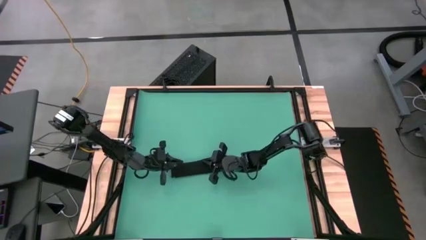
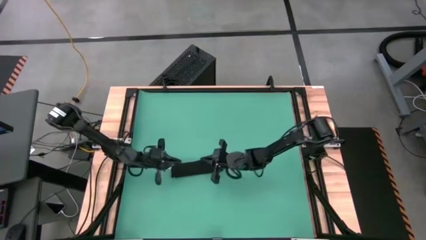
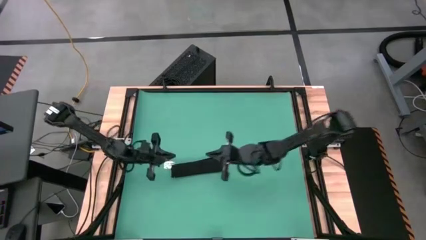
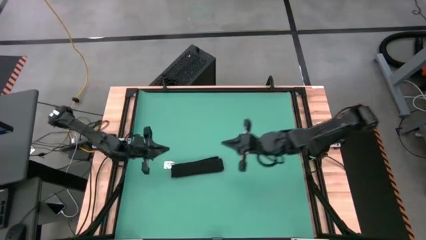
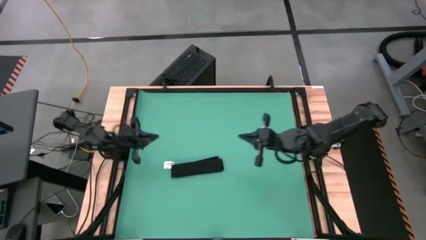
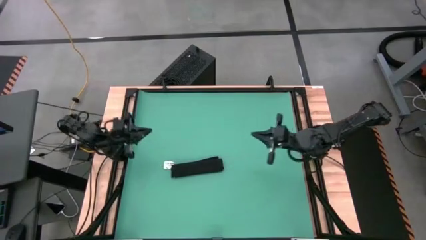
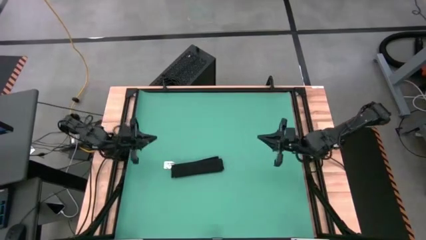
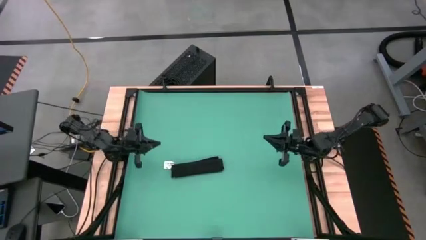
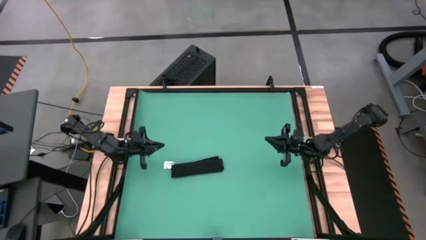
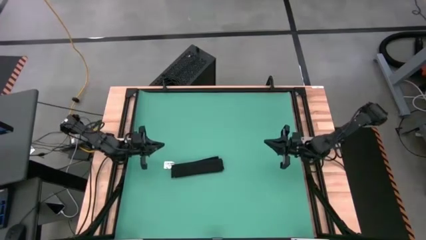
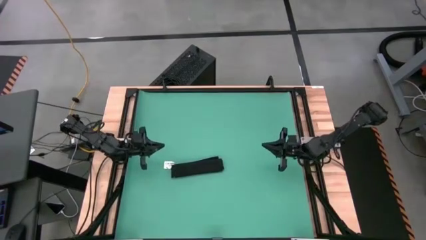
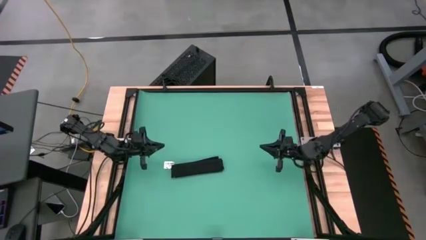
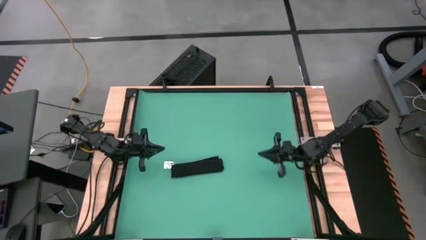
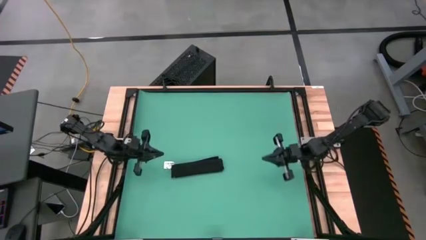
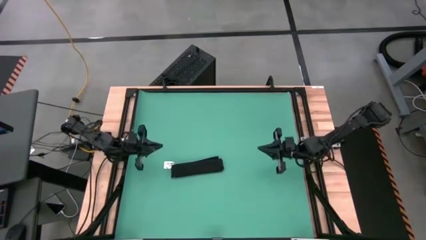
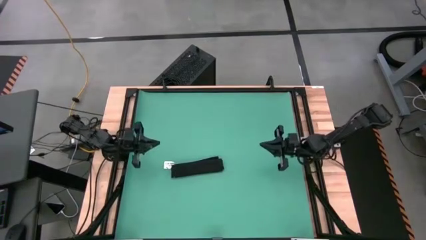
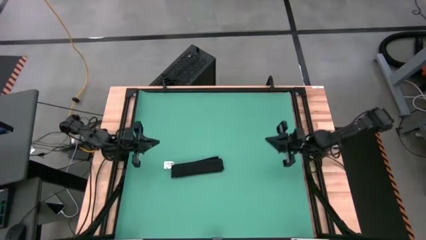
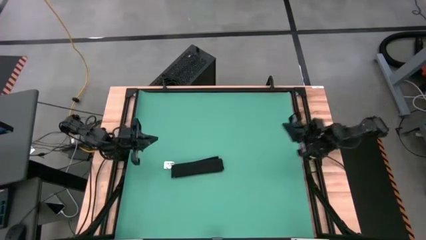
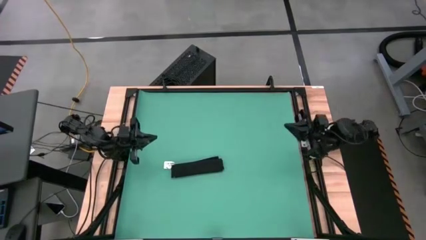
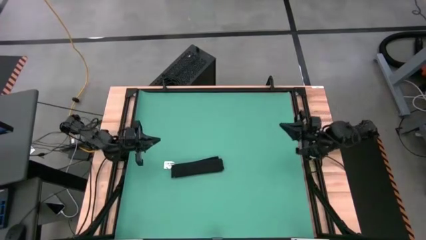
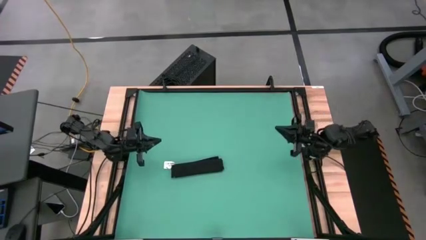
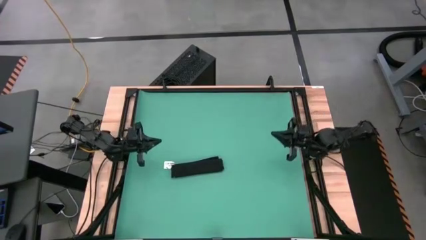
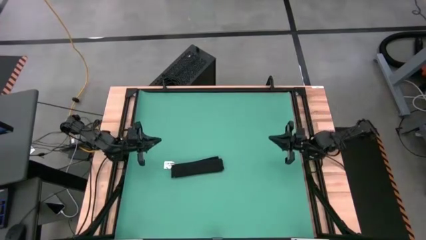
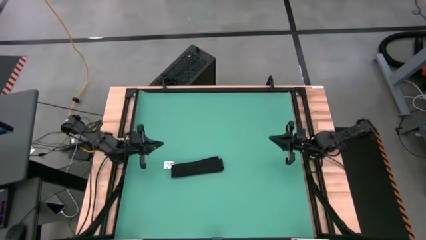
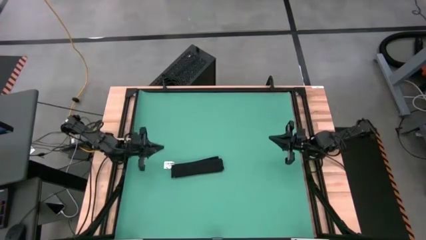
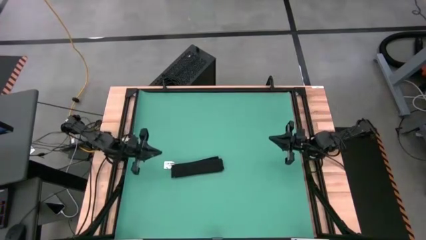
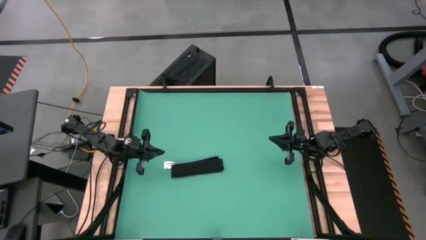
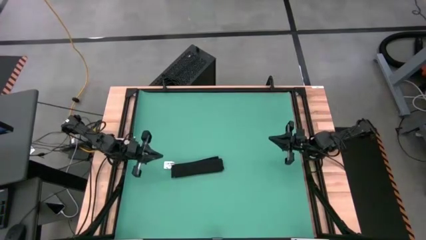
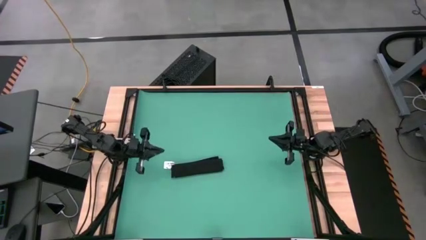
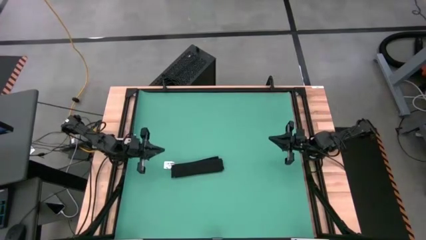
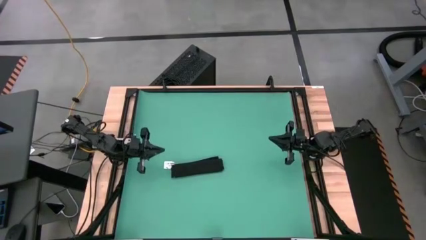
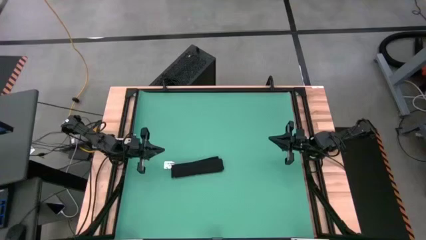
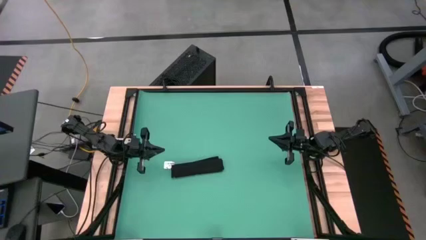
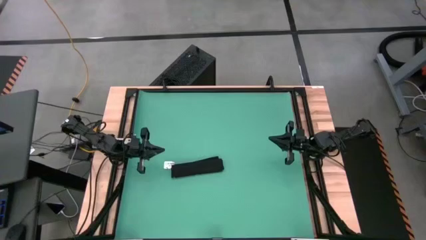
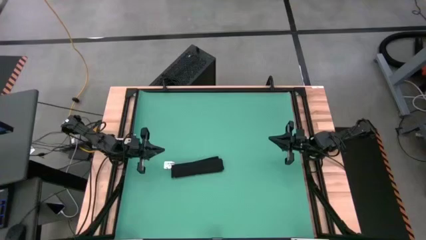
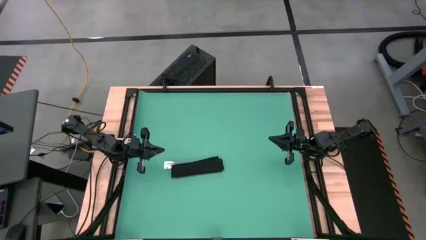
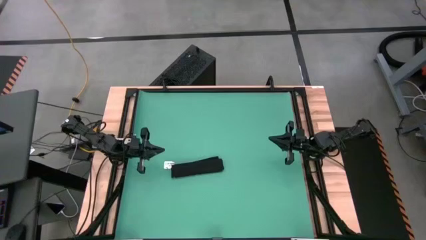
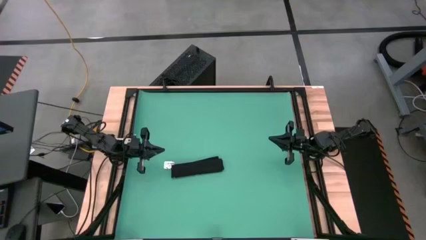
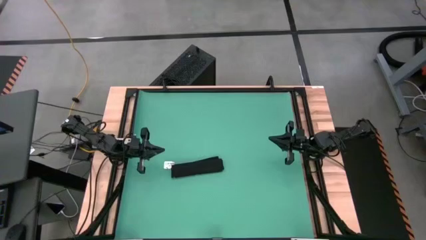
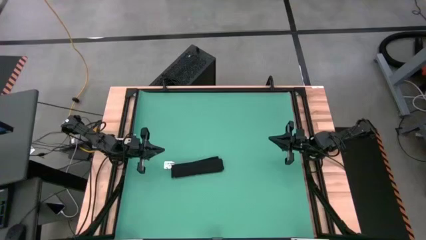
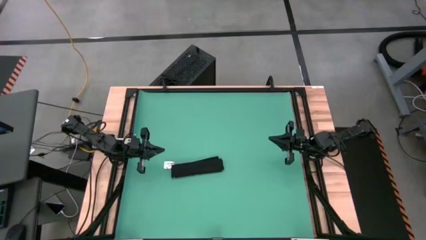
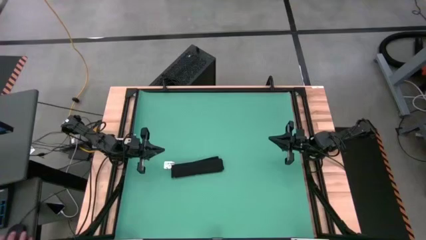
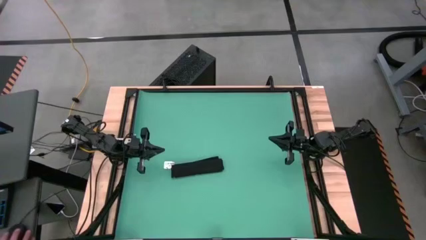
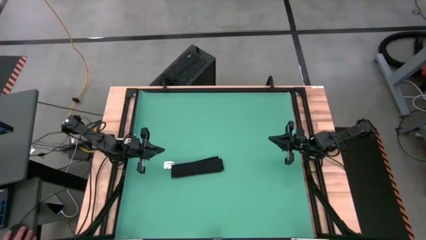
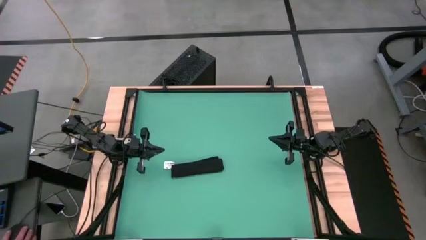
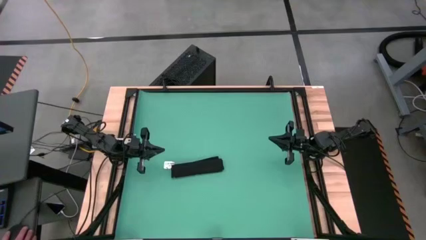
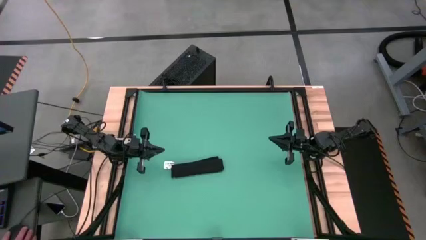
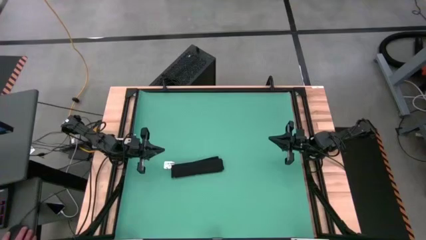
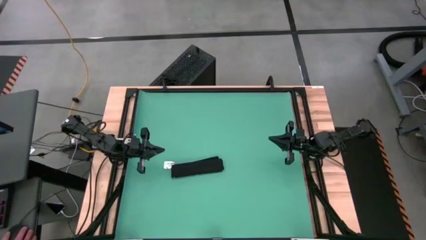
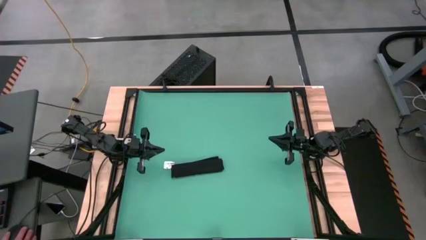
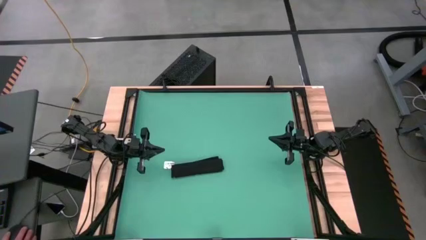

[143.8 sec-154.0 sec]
Task: Roll towel into tight, uniform cylinder
Return to Home Position

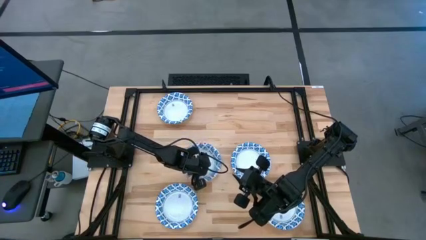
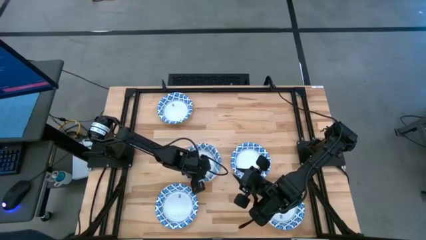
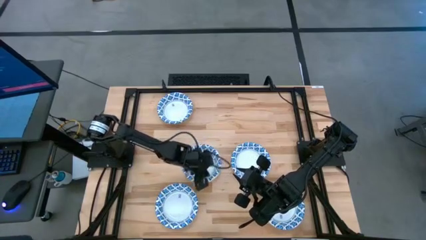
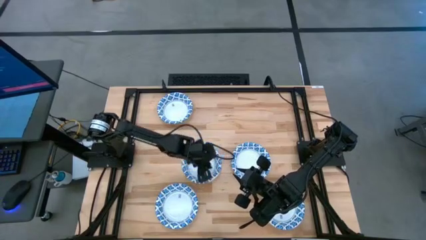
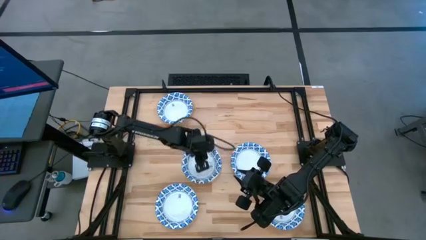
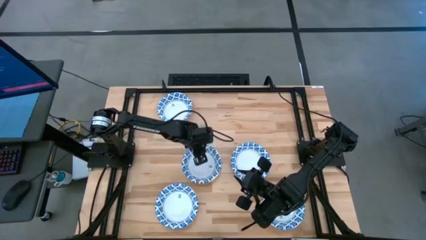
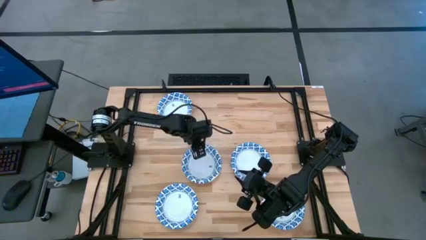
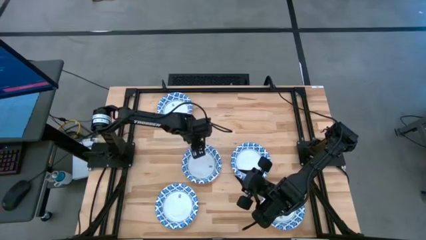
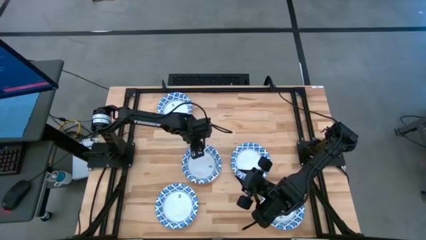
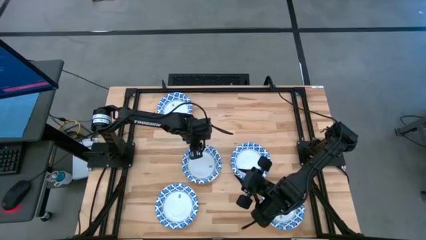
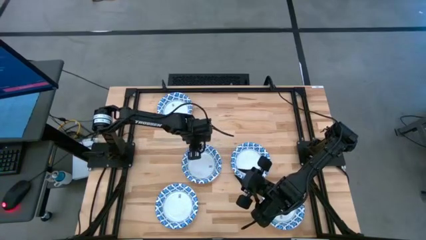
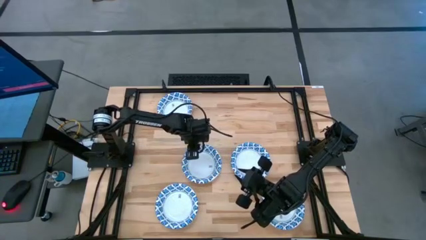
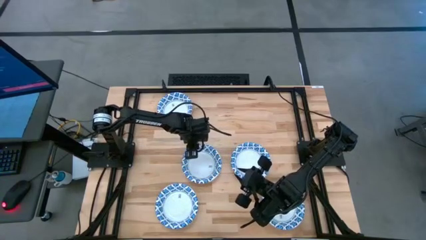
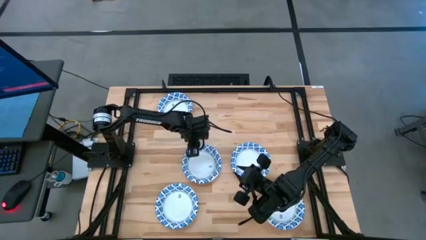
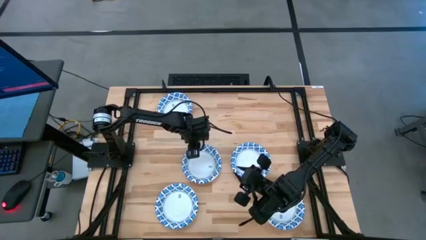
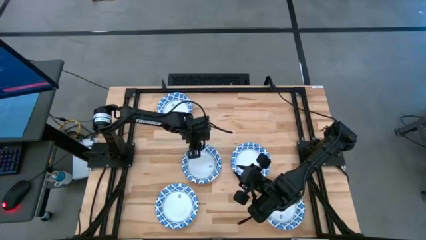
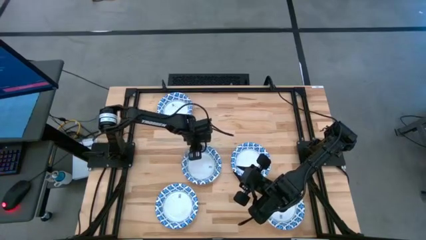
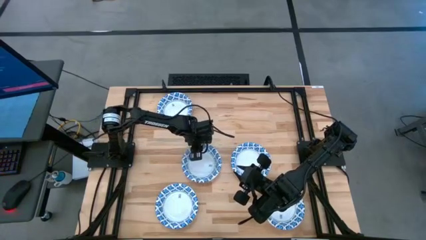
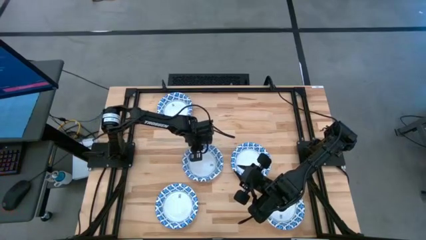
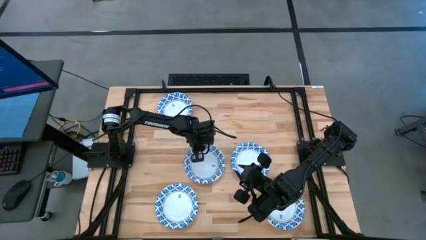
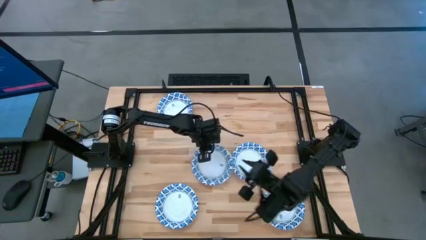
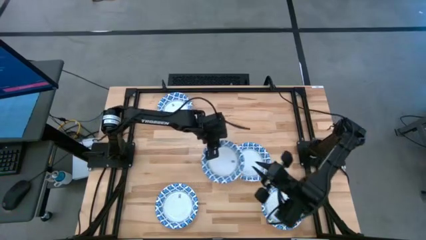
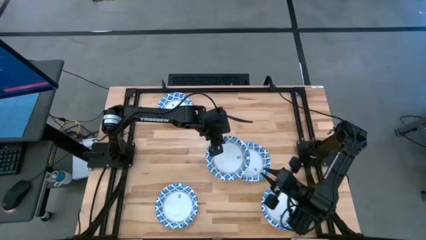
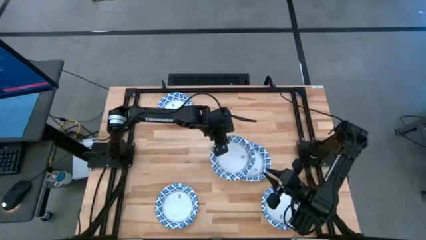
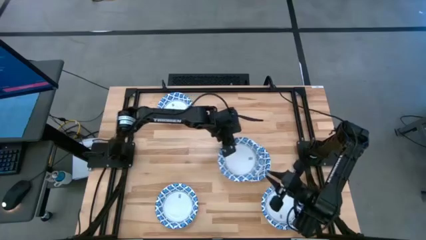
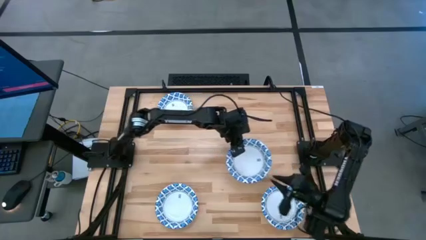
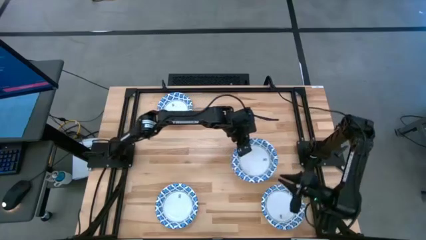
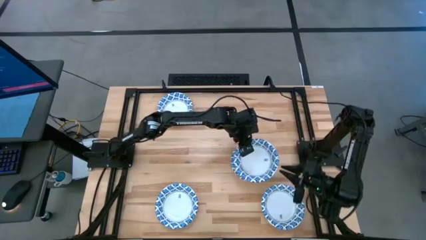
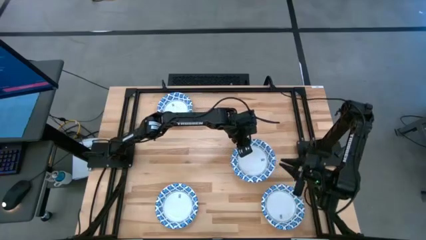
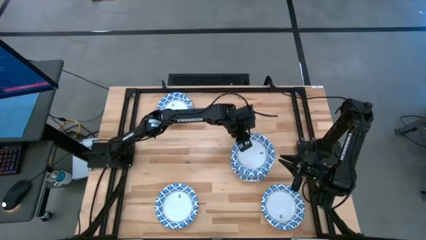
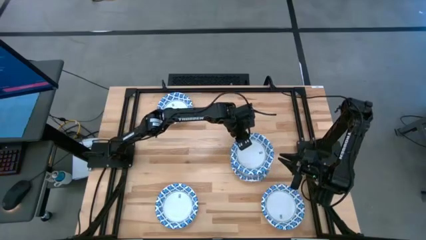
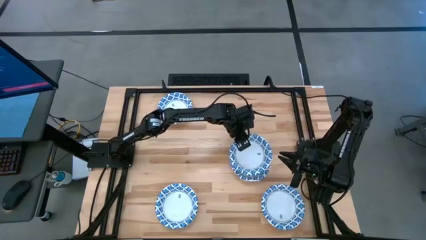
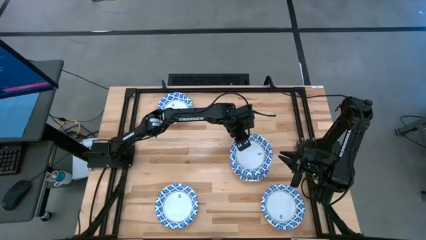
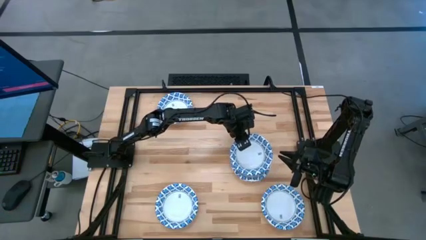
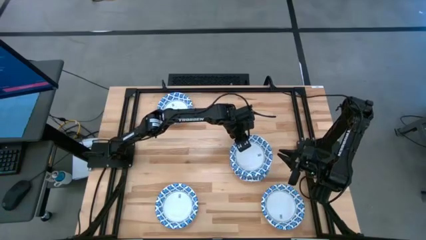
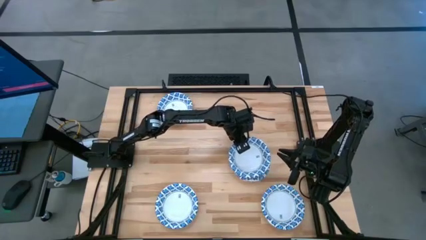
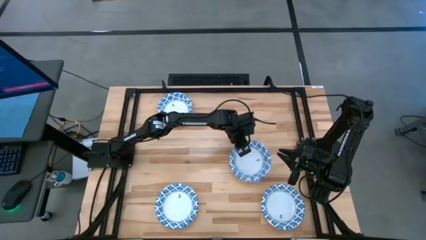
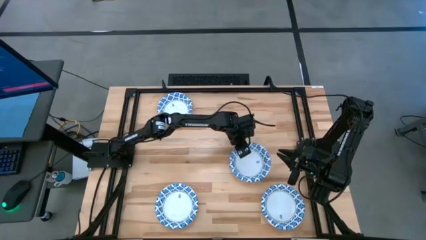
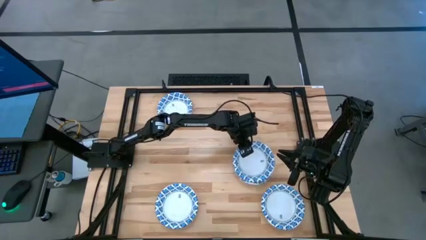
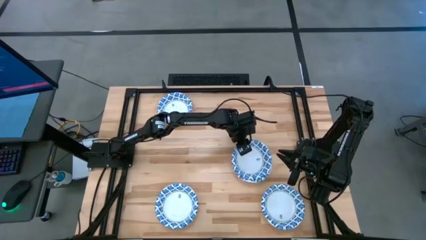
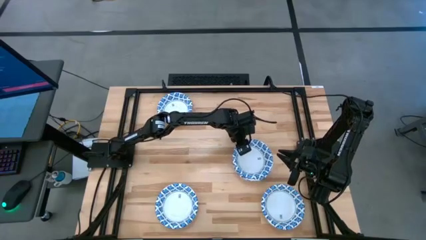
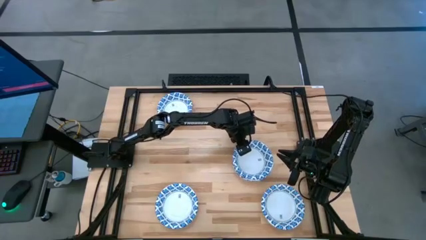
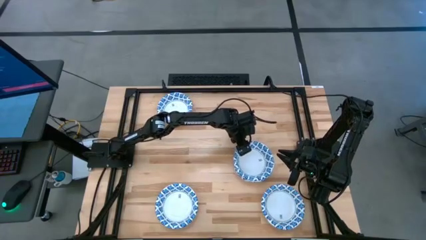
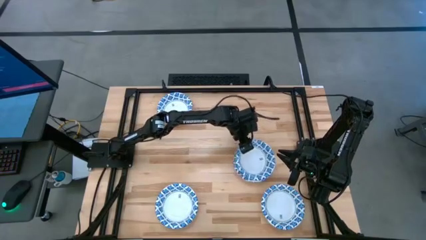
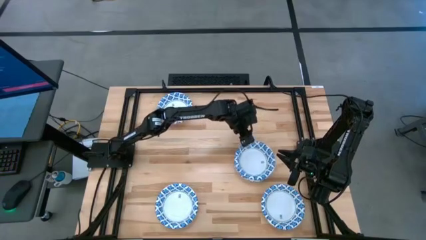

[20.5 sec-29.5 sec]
Task: Nest bowls inside each other
Stack the white bowl on top of the other white bowl
